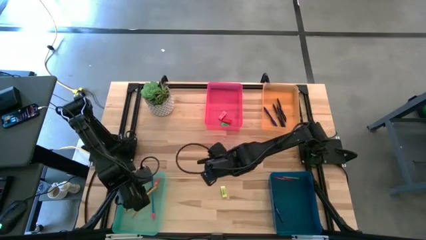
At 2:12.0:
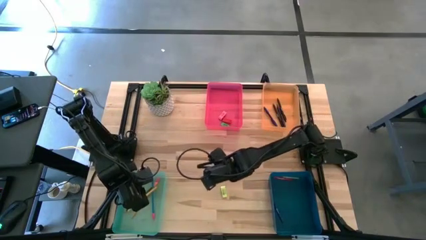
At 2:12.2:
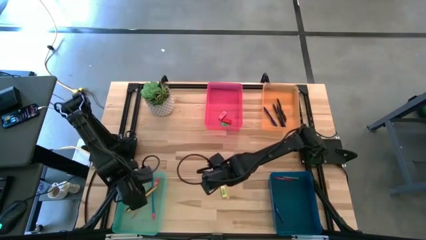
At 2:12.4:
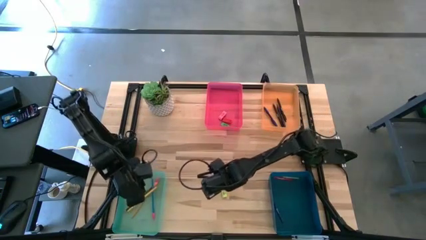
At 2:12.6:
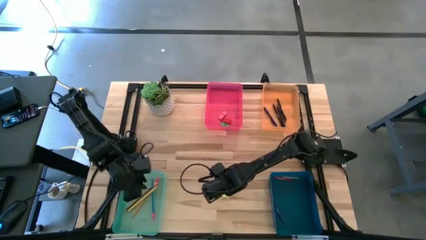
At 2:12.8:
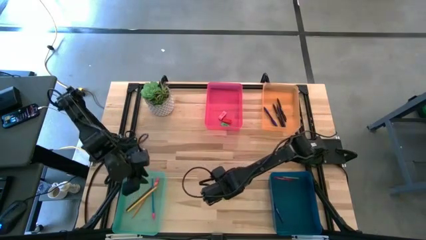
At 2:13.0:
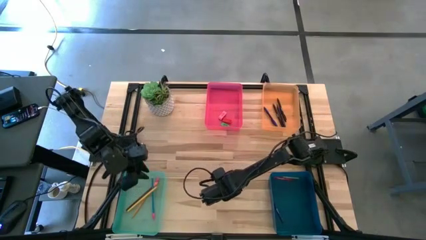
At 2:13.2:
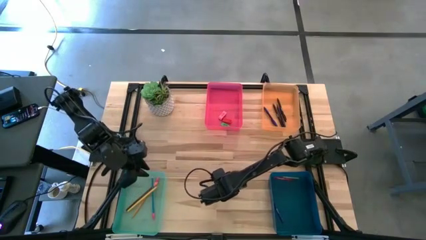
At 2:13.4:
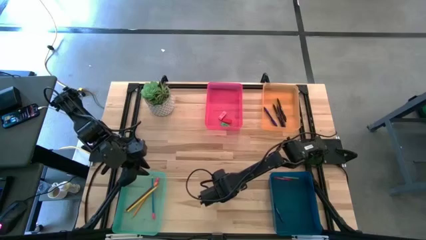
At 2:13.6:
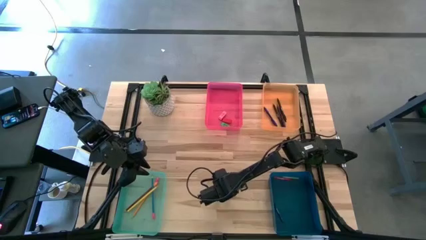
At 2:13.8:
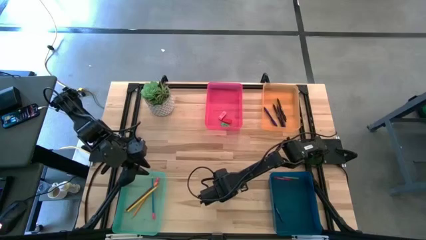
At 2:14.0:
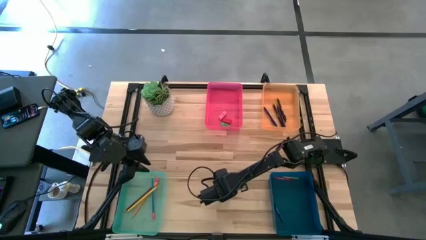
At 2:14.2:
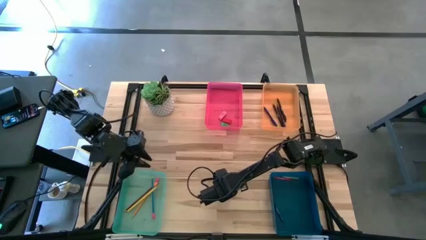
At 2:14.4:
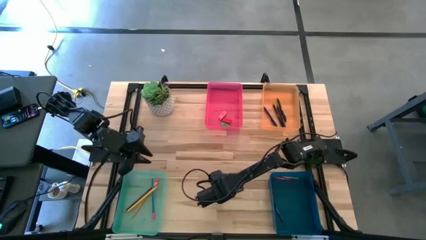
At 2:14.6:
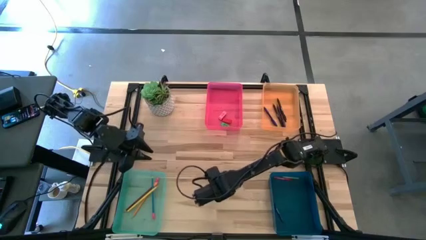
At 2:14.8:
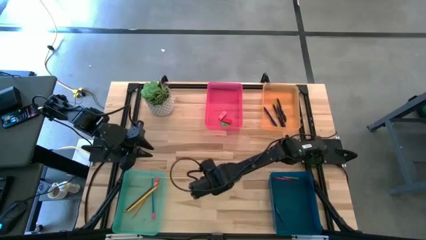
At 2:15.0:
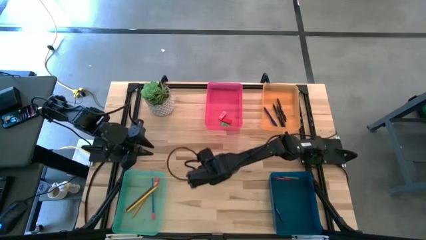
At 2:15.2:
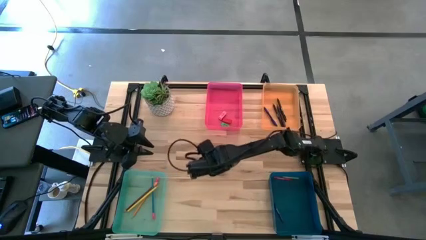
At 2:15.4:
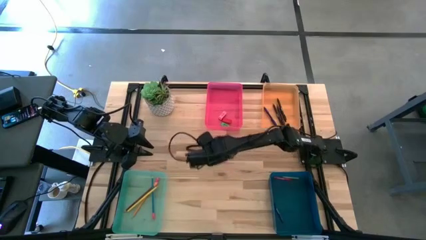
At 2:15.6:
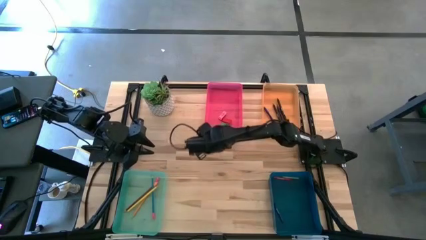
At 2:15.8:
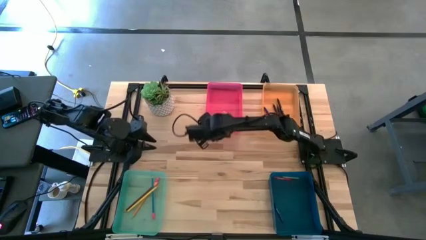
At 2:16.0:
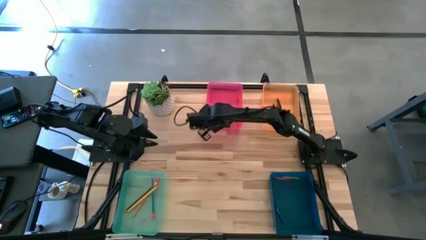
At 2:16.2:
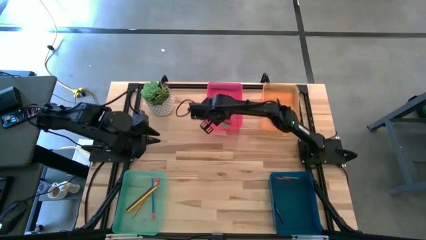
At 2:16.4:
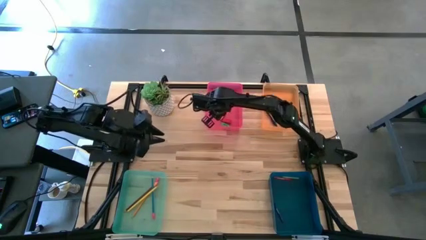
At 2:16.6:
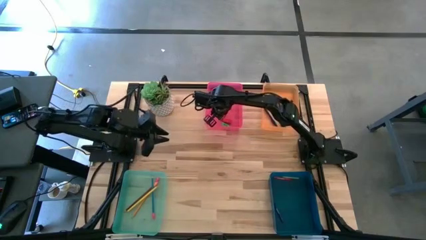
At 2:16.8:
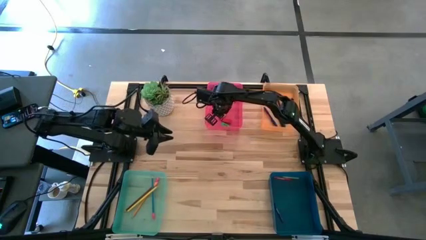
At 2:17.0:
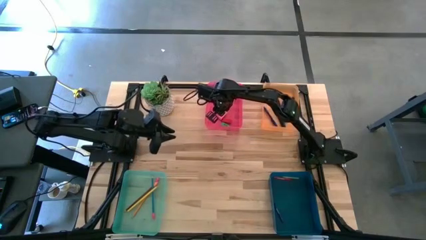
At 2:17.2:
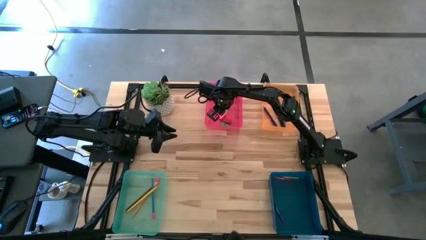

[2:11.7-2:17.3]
Task: Sort crayons/erasers/pens/pencils in bins
Put the yellow eraser into the pink bin

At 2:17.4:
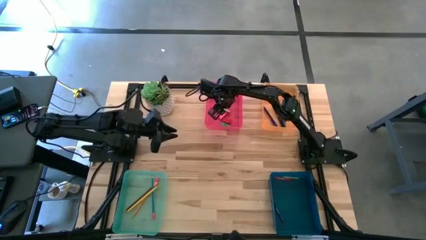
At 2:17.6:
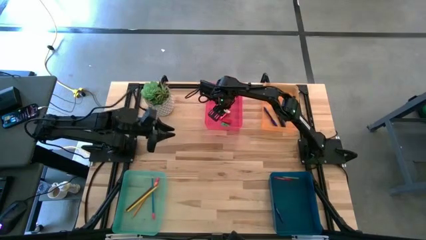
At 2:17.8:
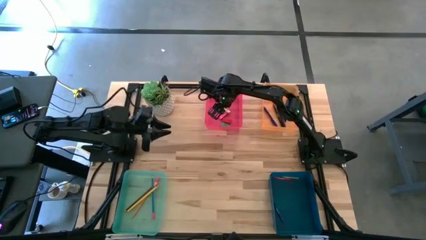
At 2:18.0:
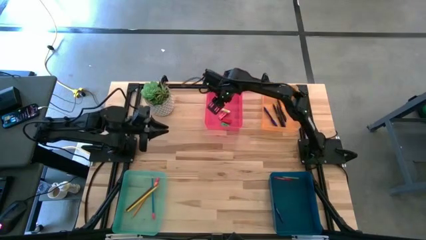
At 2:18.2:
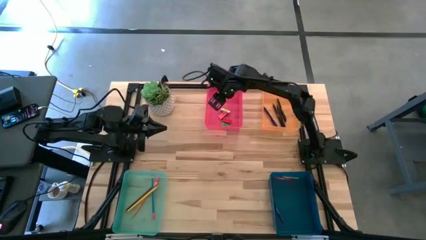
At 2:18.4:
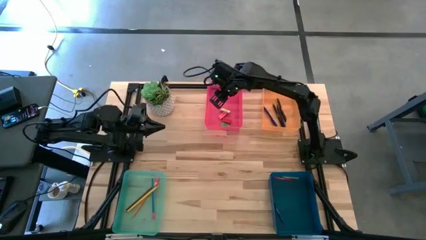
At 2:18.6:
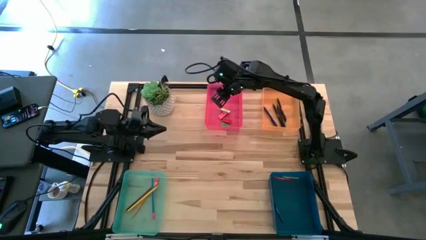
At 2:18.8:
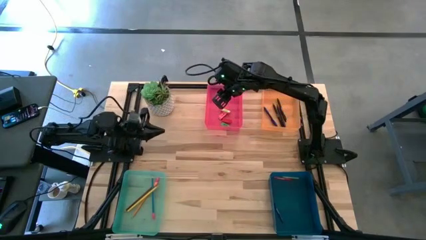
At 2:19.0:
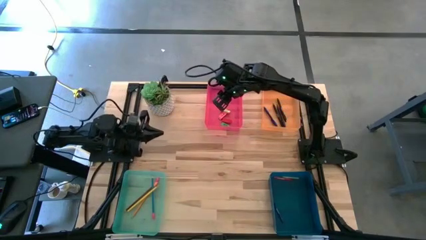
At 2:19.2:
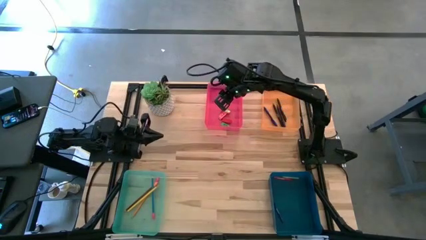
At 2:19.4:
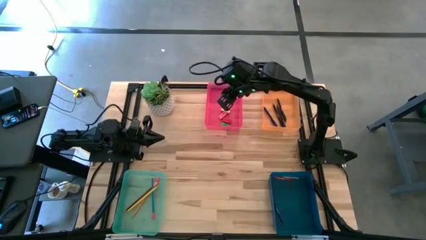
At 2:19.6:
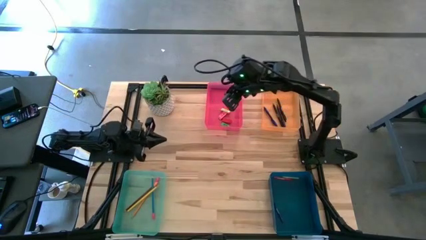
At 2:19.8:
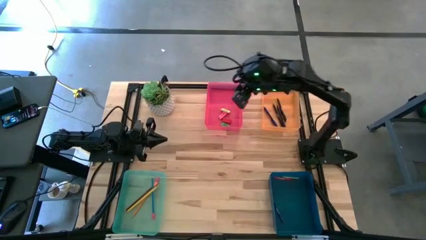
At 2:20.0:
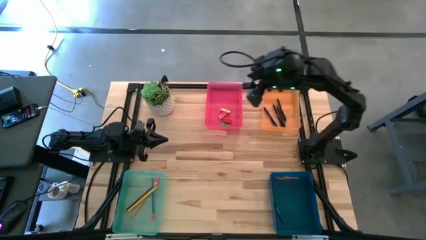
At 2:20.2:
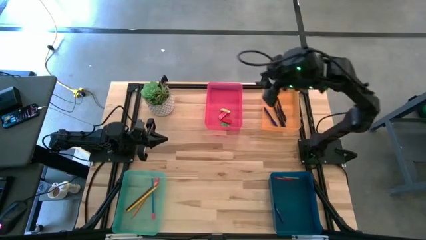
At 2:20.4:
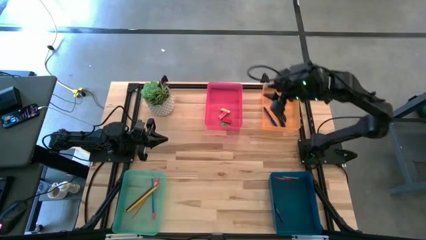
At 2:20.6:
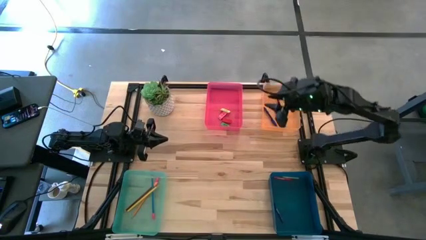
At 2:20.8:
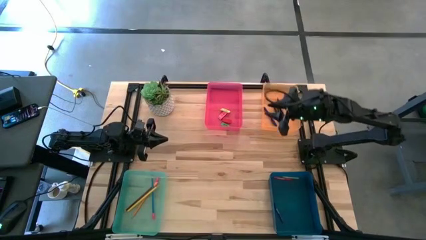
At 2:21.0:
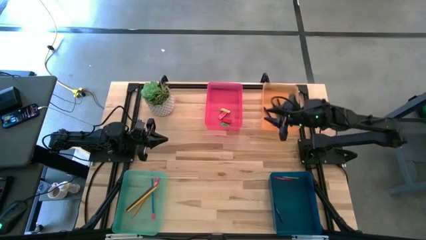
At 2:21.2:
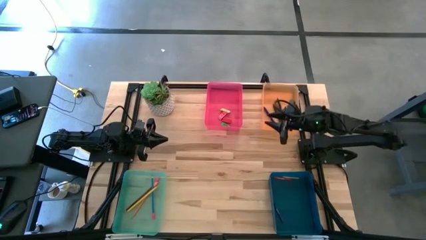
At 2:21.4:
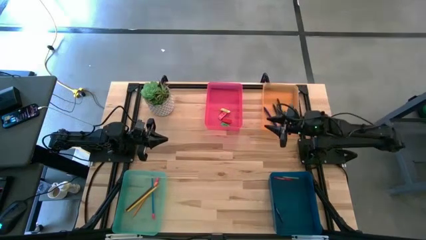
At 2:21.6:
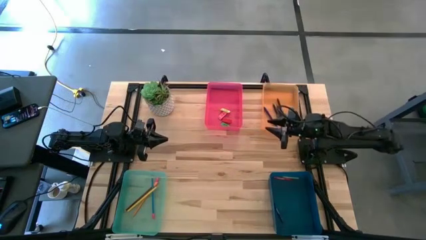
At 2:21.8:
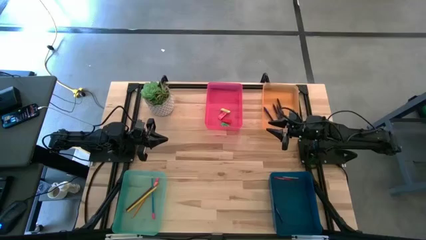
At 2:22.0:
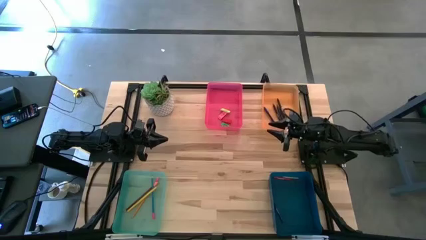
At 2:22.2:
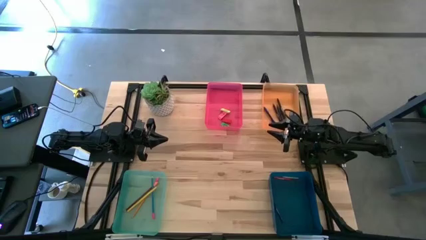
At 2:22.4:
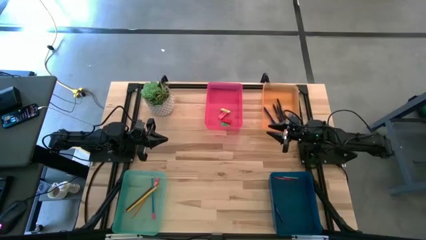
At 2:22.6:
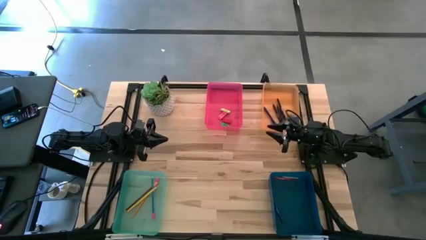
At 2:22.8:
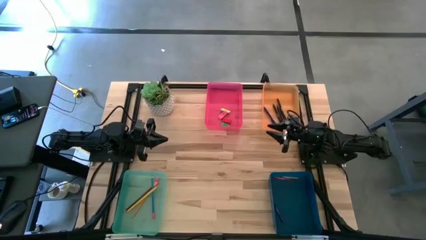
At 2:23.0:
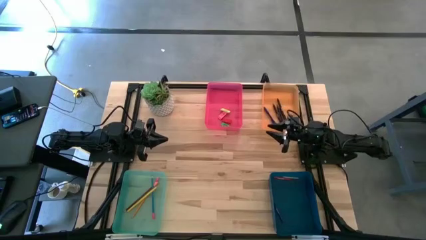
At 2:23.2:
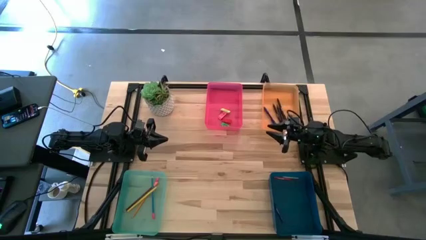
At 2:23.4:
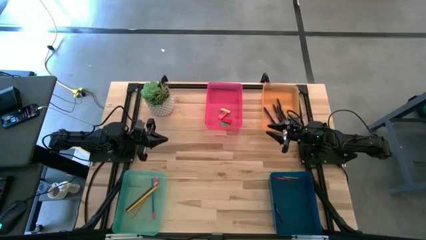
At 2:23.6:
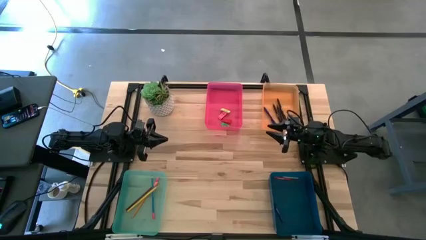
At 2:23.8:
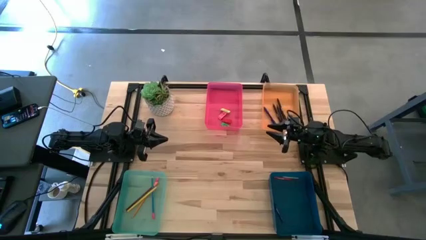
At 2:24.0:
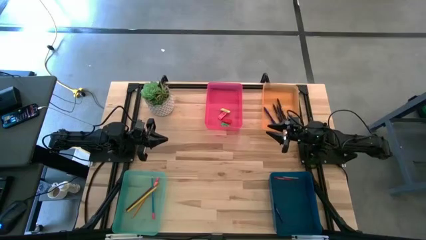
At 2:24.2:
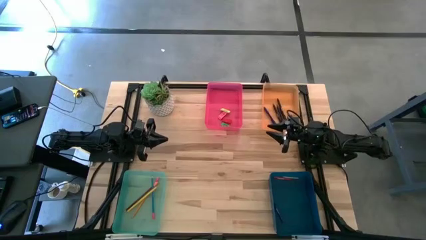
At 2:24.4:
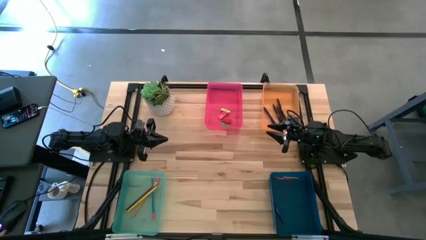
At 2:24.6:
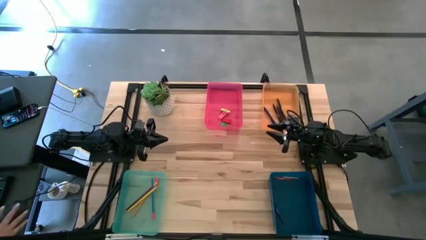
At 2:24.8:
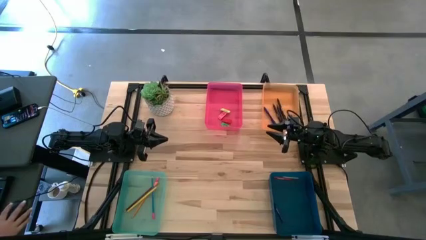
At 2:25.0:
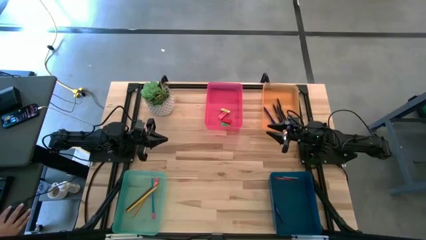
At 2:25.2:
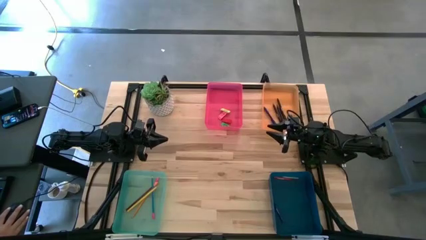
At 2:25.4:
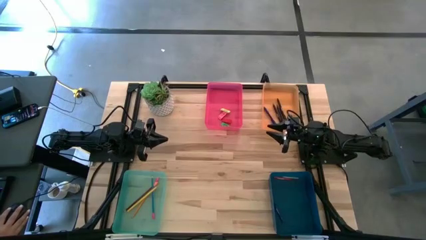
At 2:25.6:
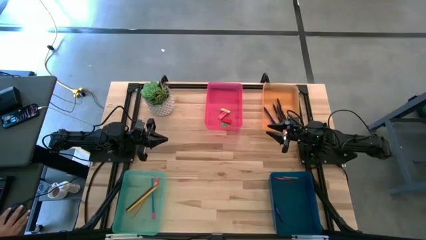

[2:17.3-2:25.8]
Return to Home Position

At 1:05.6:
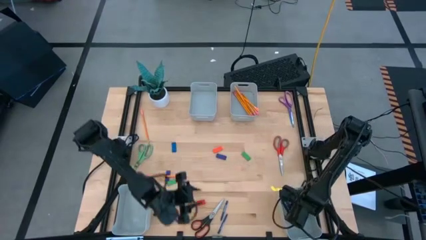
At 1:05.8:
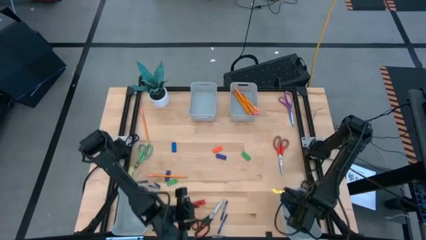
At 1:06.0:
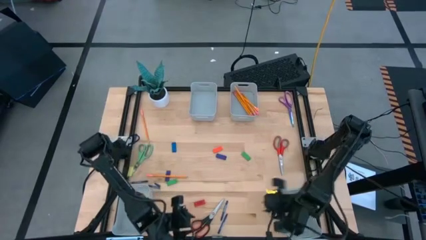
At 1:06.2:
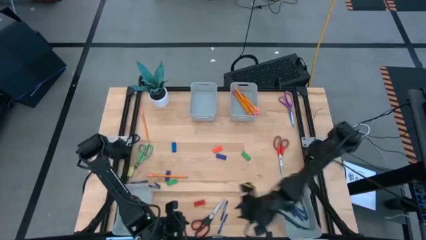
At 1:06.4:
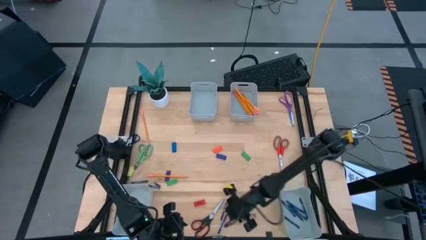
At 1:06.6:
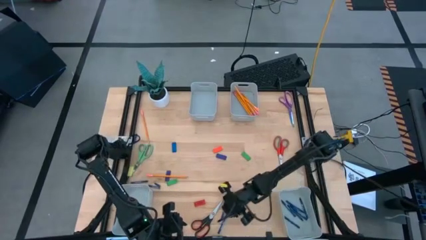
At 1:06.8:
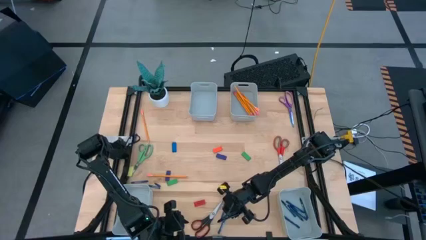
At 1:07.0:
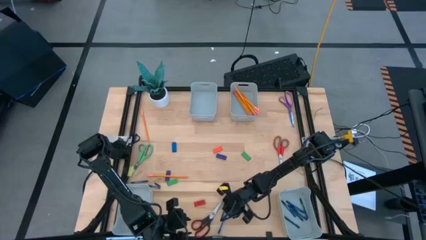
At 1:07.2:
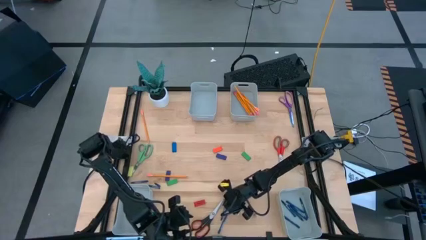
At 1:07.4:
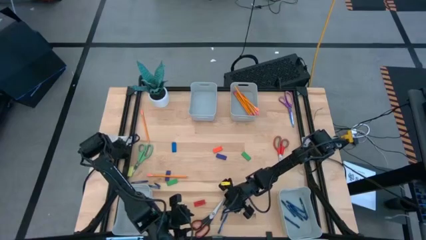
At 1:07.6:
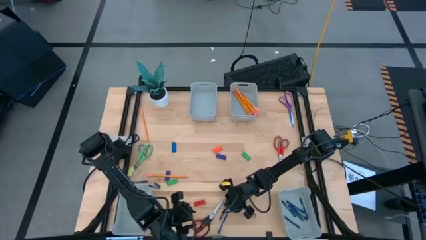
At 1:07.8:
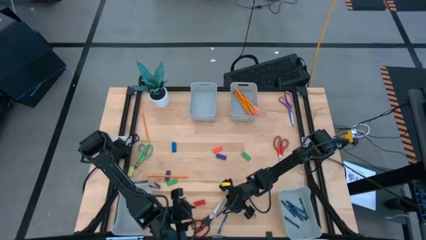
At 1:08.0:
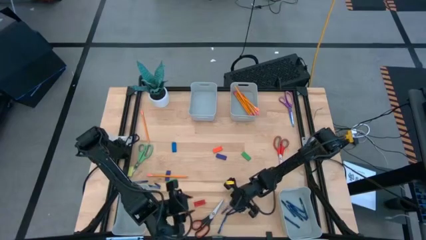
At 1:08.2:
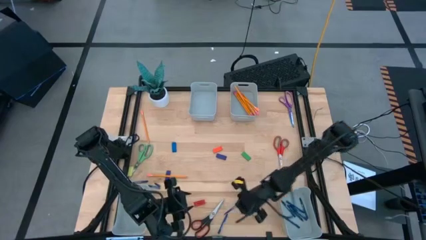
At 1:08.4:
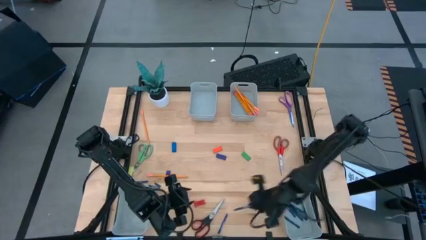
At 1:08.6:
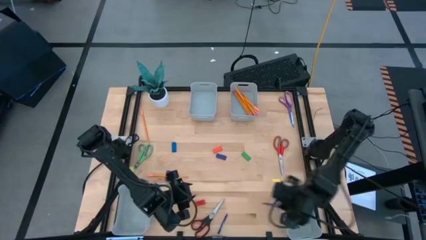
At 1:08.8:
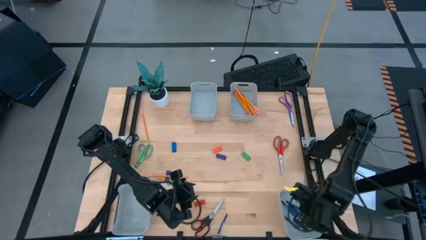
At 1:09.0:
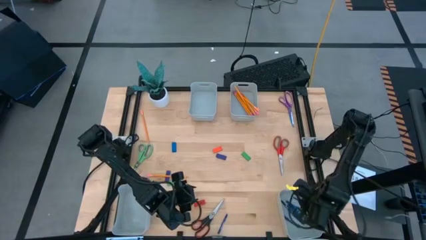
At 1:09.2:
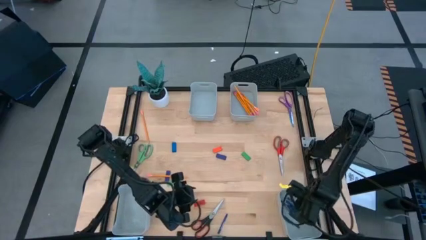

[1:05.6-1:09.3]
Task: Sort crayons/erasers/pens/pencils in bins
Put the blue crayon into the bottom right bin
